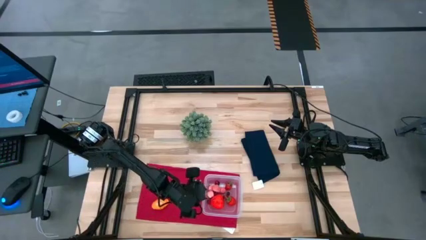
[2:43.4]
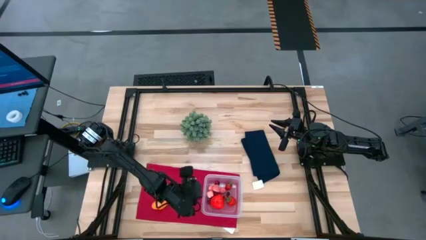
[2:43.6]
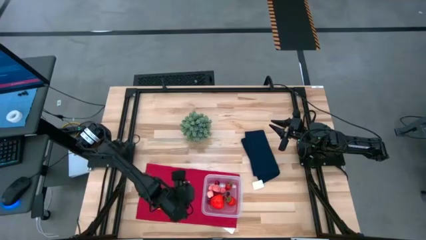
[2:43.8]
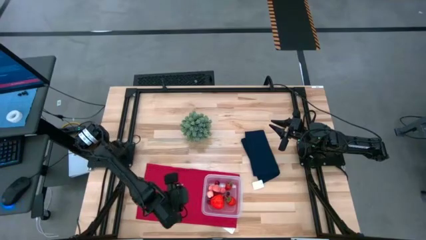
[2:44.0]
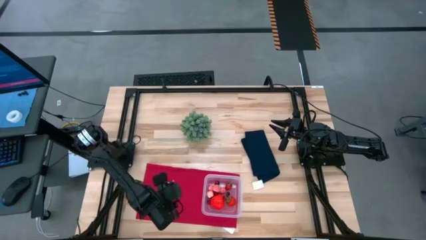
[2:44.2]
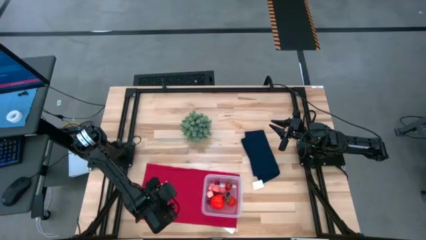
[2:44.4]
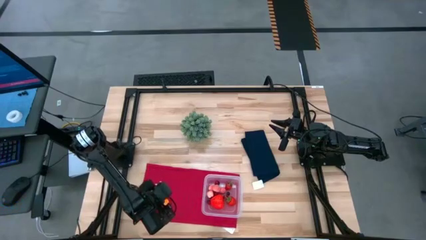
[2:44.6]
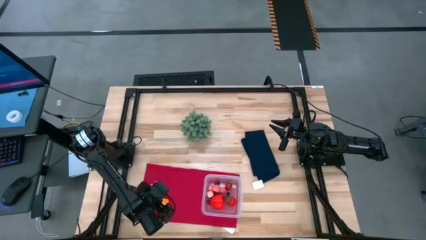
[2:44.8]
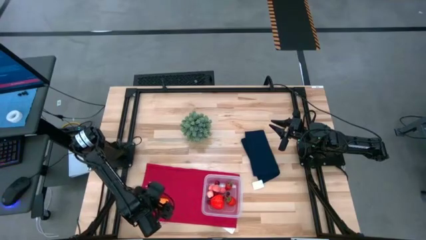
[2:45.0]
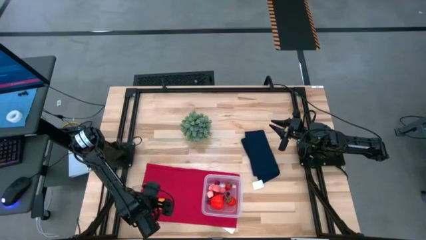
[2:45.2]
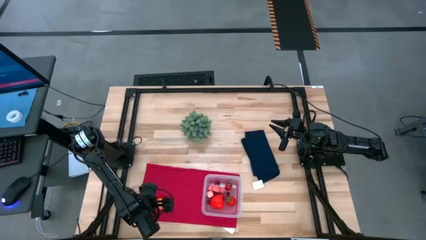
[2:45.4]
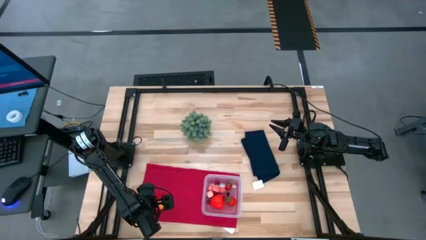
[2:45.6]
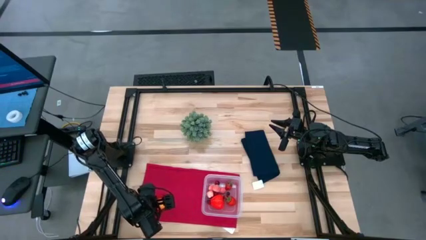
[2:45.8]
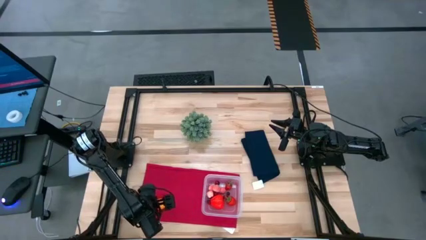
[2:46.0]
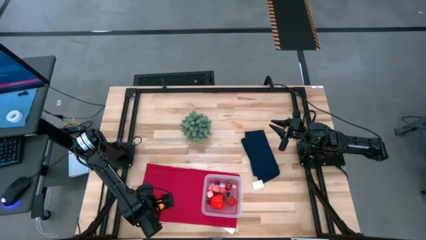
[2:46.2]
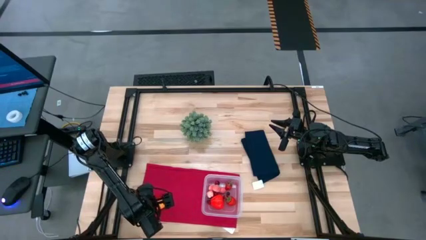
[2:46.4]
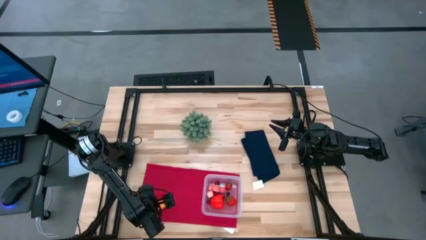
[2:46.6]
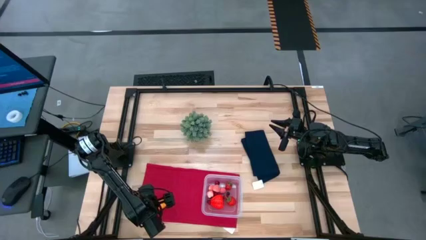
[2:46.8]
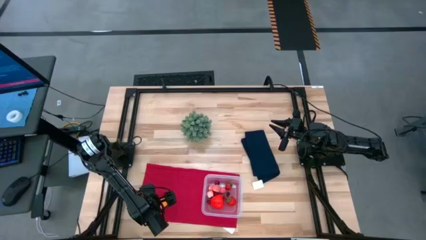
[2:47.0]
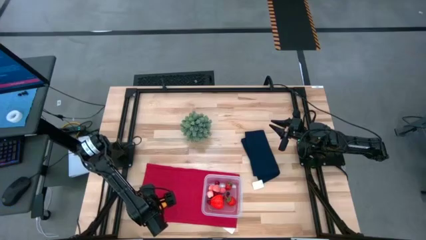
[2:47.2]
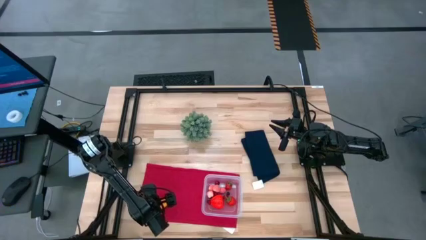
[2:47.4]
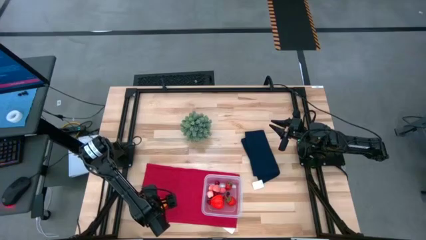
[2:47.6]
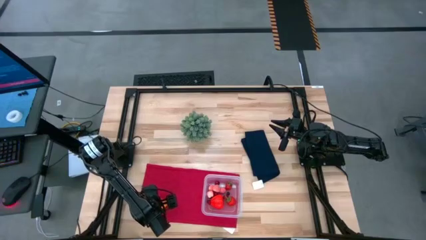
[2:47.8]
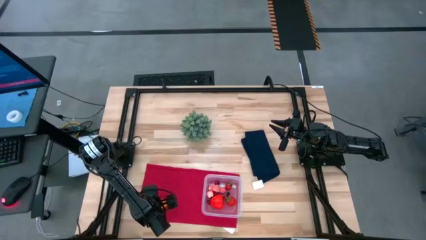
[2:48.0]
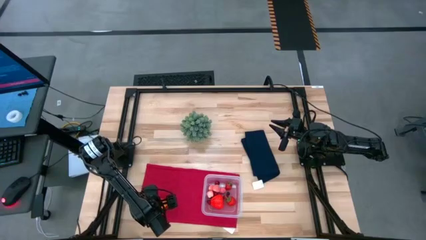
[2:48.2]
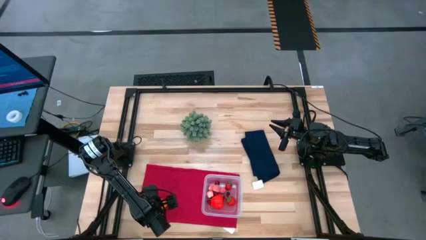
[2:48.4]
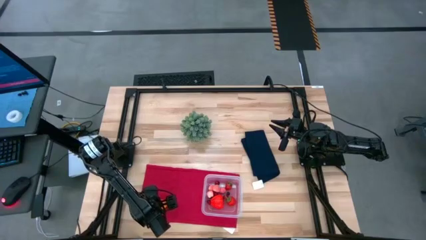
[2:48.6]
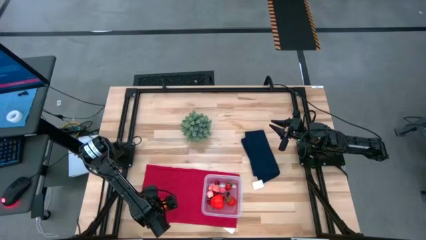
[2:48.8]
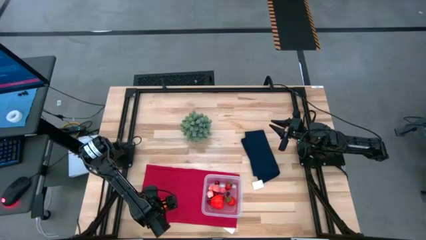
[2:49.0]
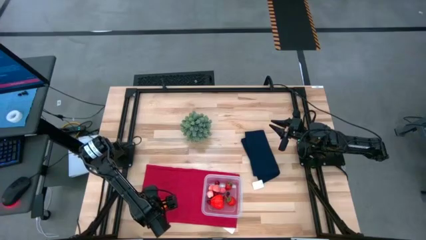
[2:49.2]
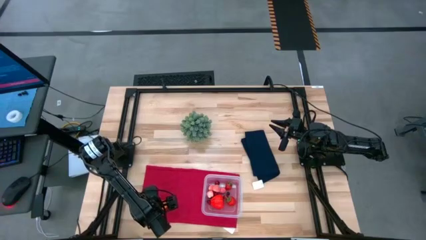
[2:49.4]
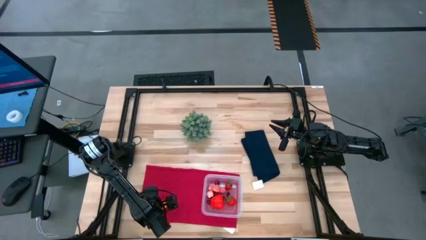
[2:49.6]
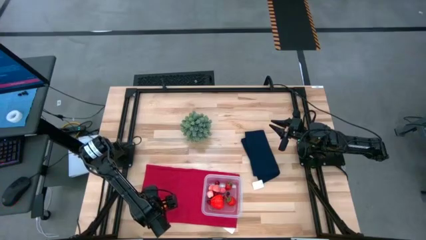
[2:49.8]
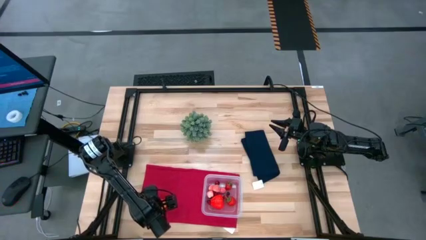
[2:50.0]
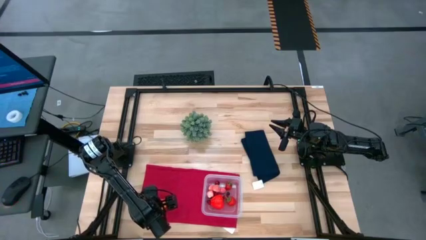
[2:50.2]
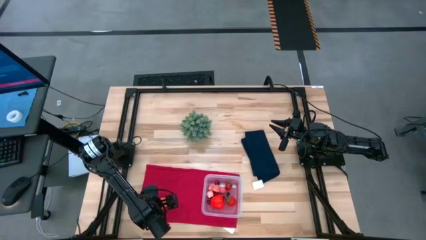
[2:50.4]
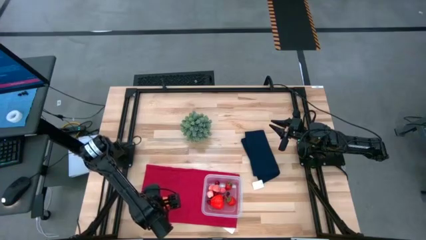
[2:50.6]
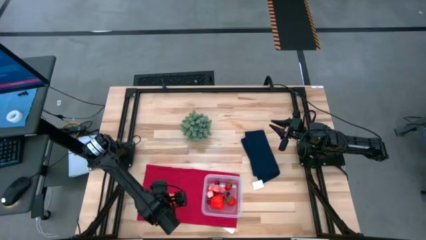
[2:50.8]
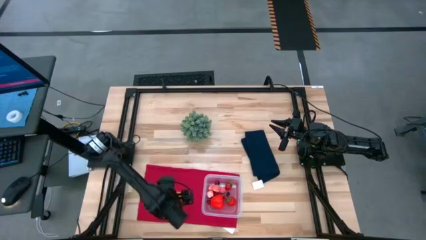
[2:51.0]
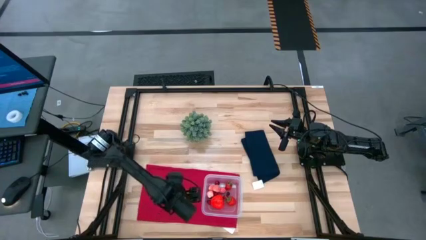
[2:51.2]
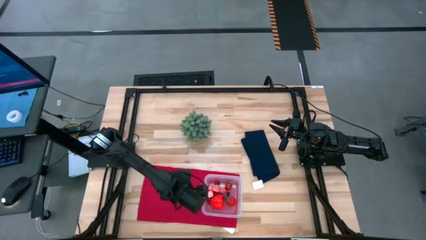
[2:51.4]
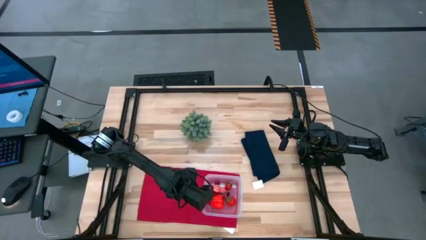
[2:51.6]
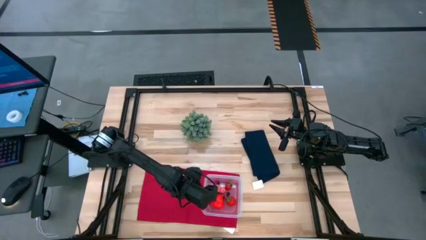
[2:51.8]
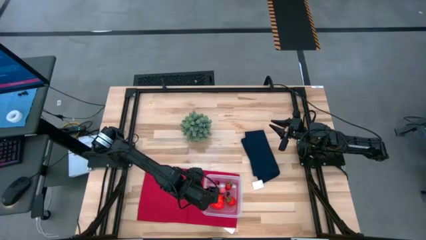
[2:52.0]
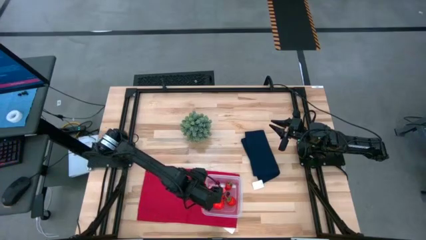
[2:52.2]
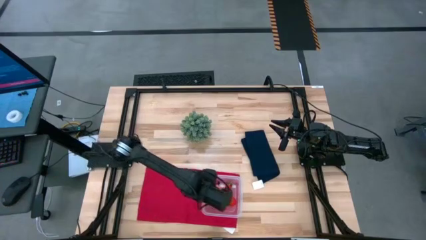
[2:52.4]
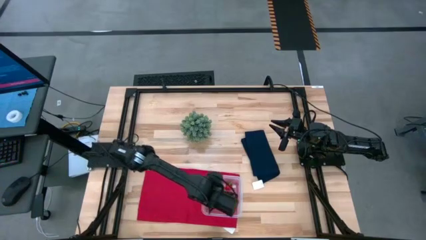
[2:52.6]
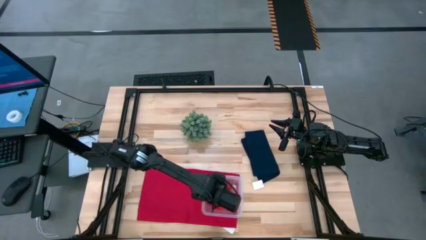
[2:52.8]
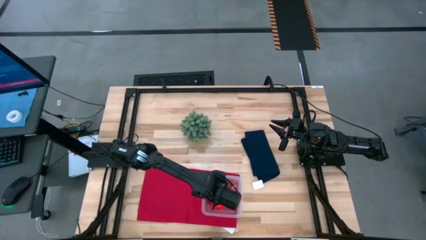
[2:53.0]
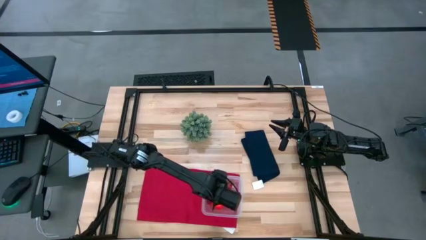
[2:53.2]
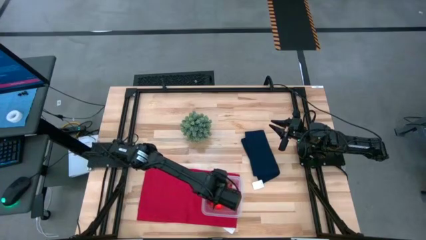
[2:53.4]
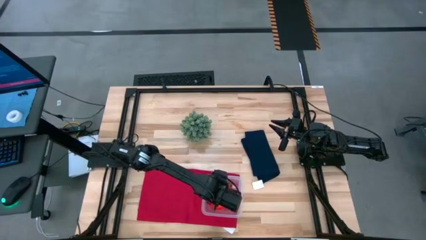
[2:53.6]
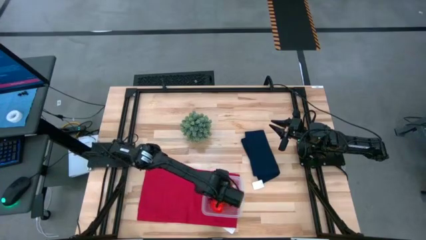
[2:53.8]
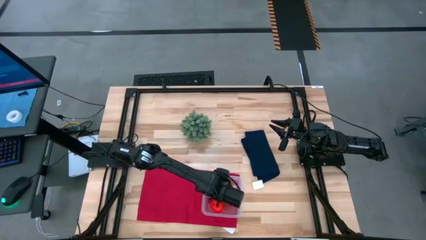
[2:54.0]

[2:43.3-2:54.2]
Task: Pick and placing Produce into tupperware
Put the croissant into the transparent bin

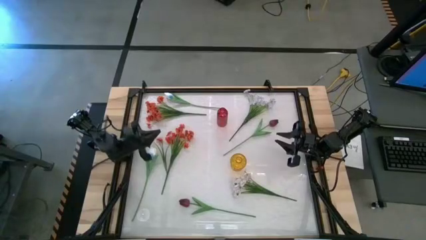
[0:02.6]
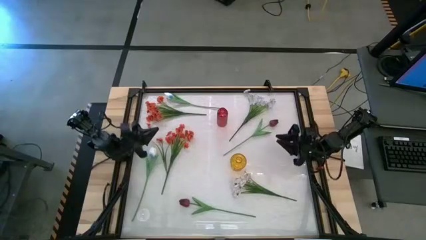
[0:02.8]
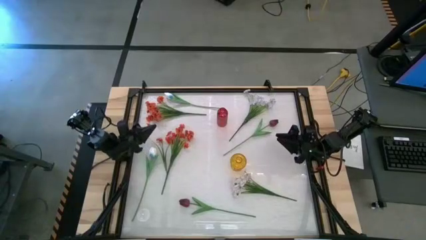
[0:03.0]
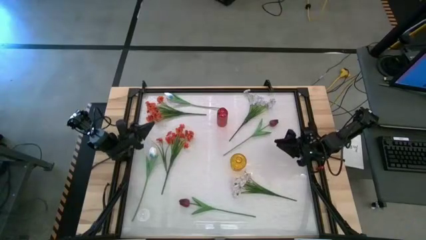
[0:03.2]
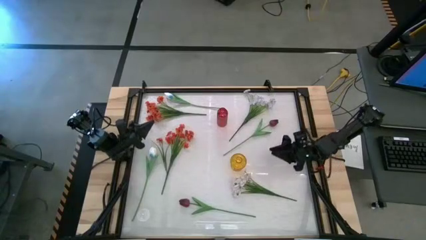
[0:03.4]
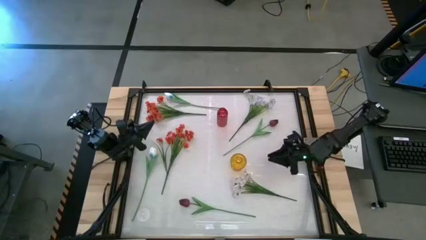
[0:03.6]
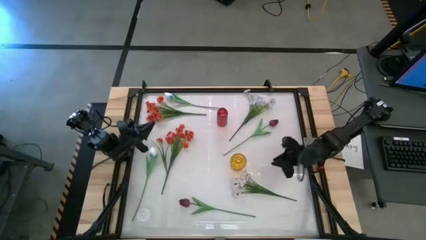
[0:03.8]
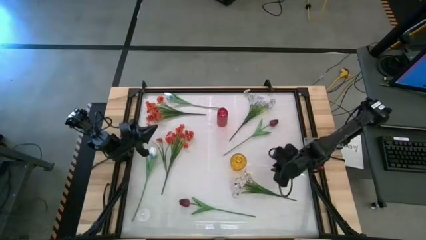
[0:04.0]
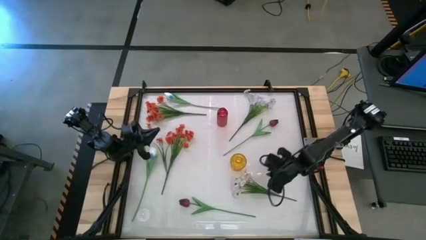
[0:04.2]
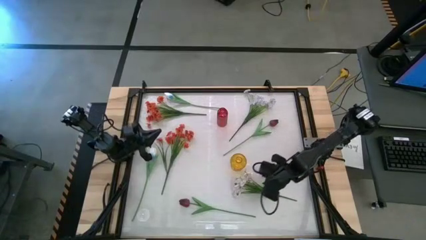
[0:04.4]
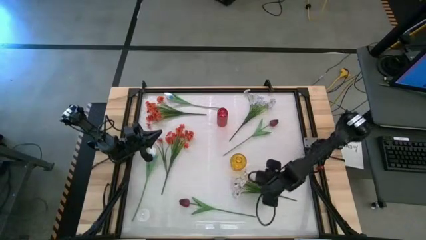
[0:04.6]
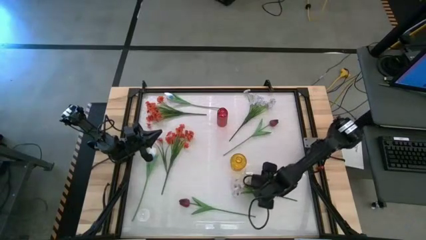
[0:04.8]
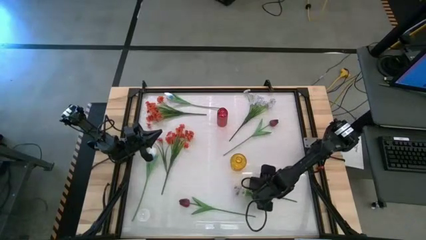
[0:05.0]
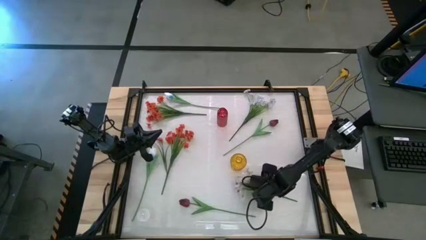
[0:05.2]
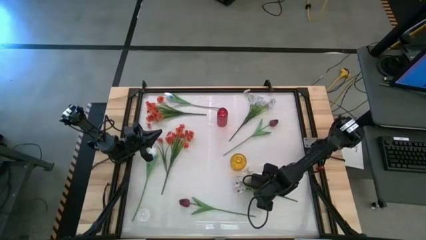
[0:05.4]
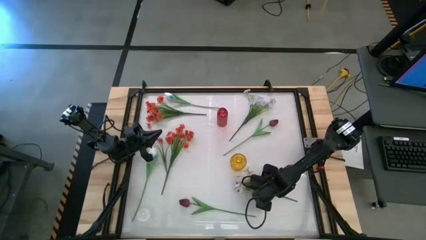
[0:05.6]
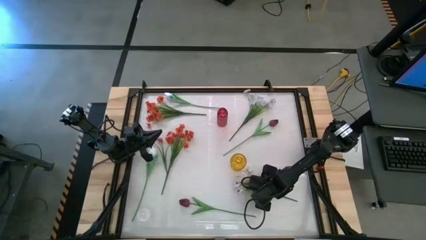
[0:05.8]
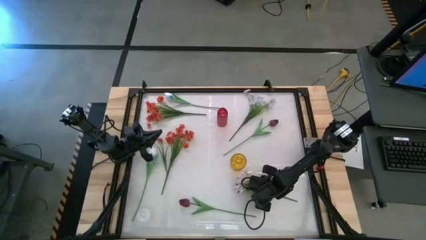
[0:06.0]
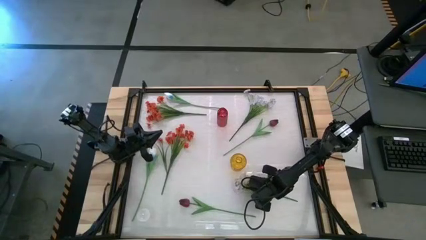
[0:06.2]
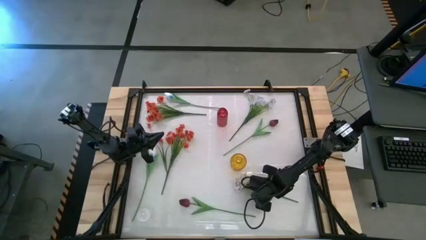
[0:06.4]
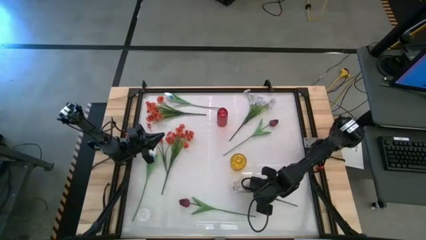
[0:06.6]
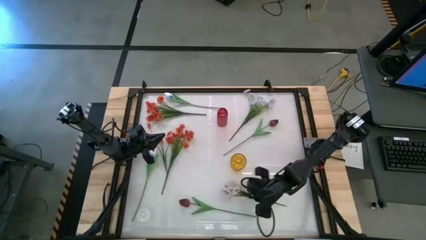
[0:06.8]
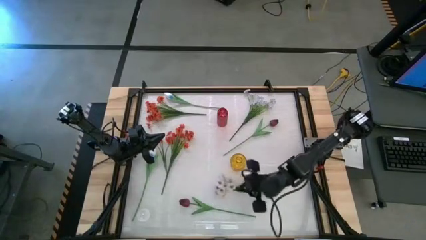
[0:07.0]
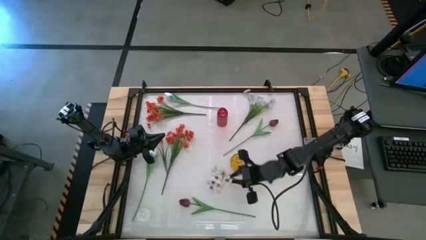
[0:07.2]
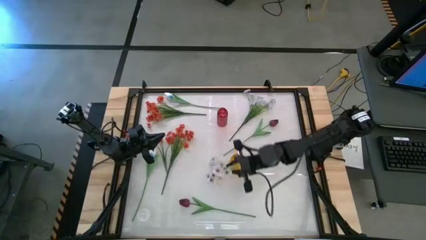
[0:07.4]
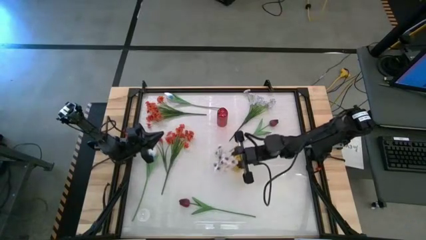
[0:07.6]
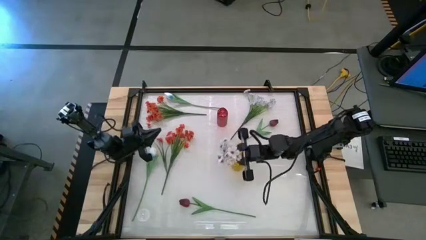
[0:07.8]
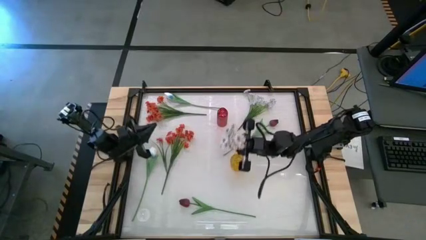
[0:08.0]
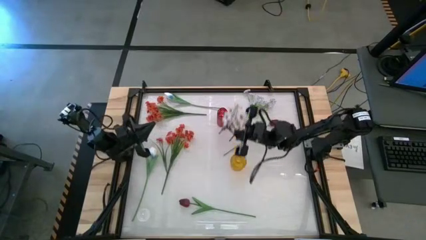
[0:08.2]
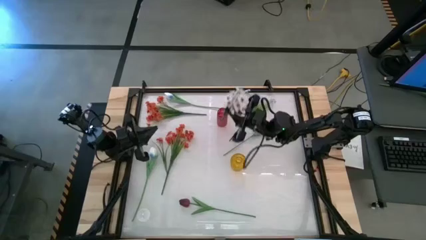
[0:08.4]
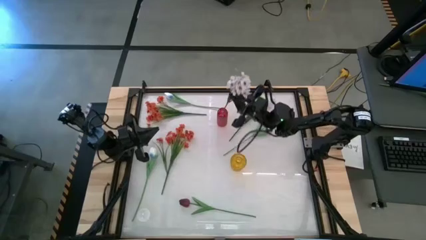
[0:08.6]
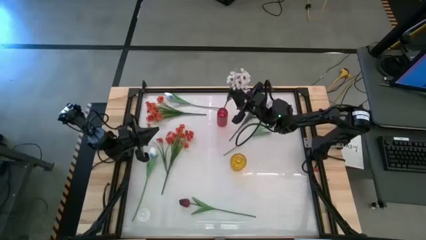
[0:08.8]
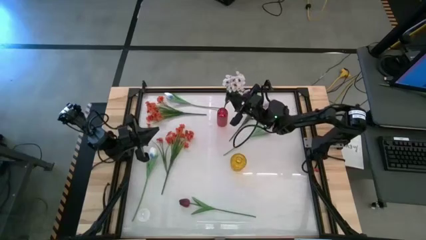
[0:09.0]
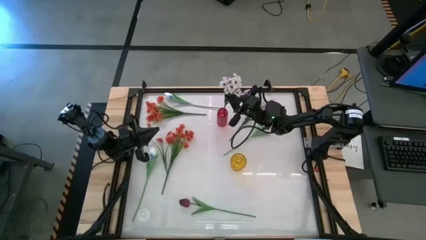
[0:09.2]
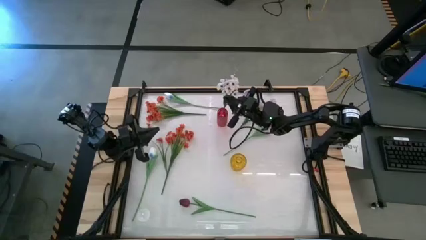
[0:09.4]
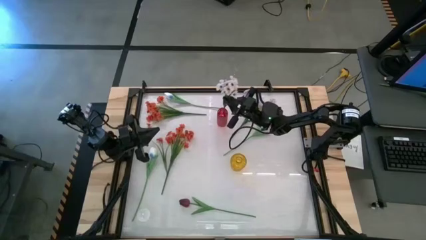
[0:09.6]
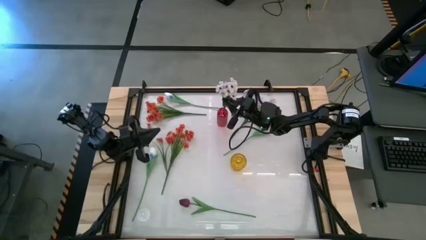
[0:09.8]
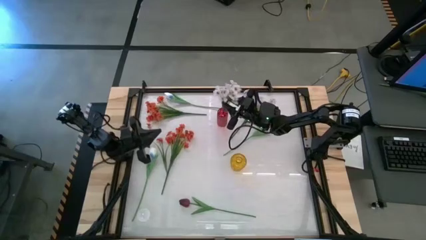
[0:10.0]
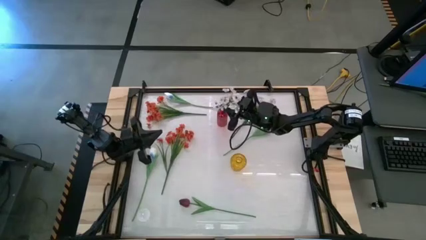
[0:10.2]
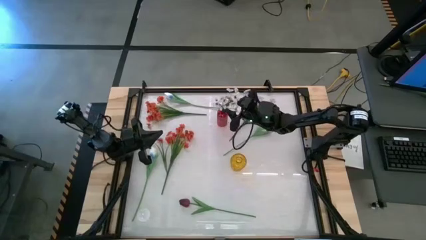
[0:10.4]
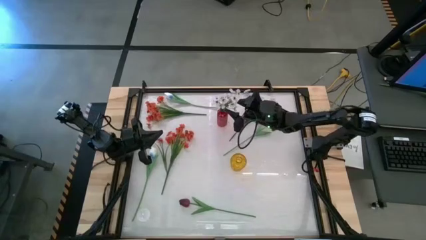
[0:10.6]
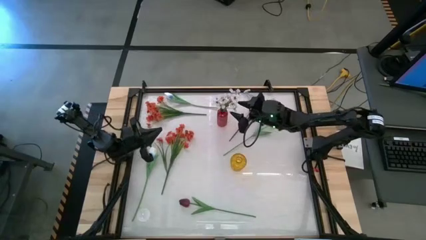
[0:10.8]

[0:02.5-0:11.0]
Task: Sort flowers into vase by color
Put the bottom white flowers into the red vase
